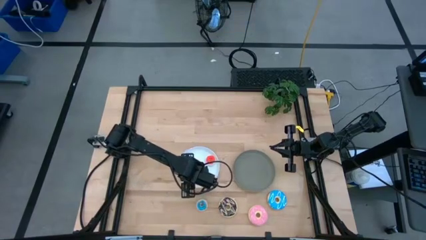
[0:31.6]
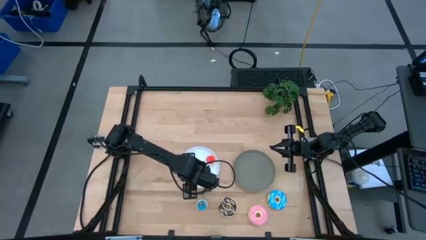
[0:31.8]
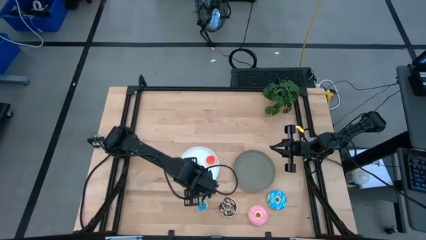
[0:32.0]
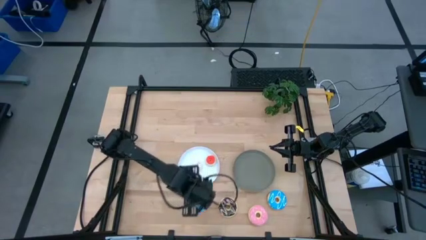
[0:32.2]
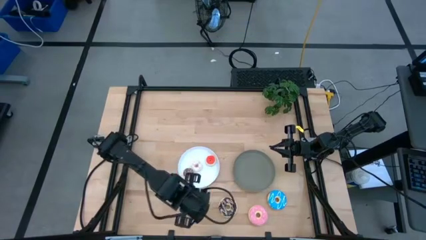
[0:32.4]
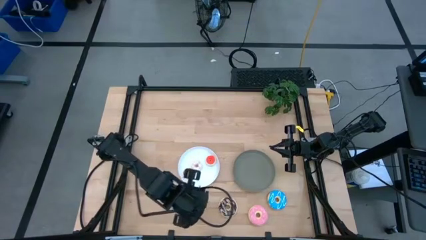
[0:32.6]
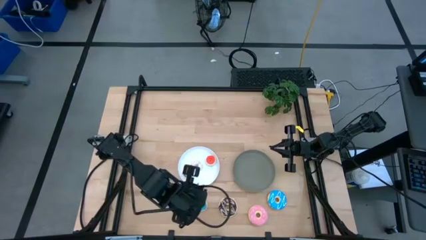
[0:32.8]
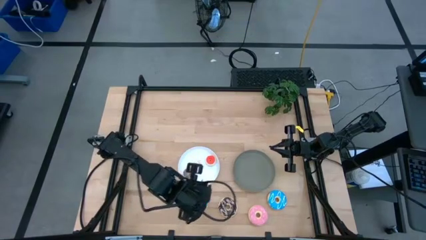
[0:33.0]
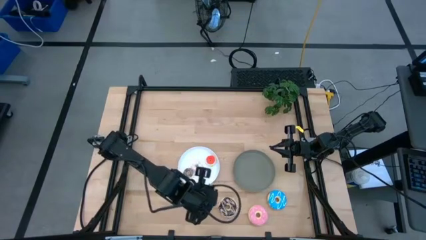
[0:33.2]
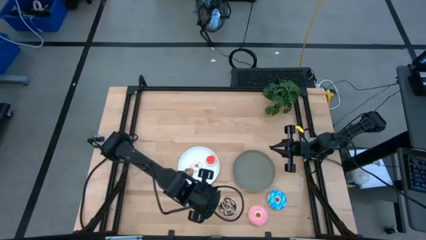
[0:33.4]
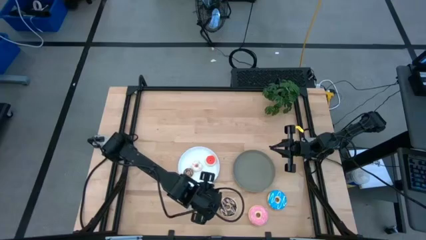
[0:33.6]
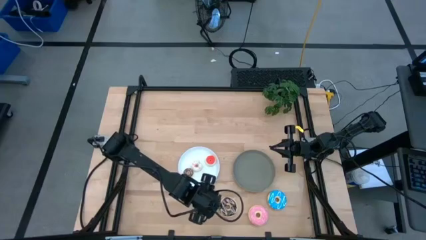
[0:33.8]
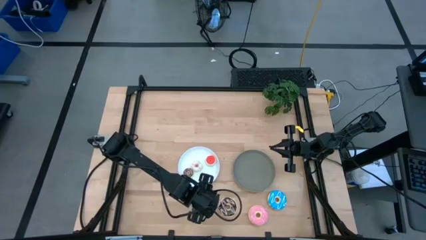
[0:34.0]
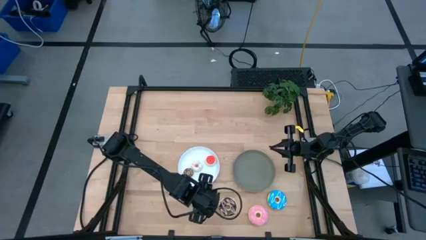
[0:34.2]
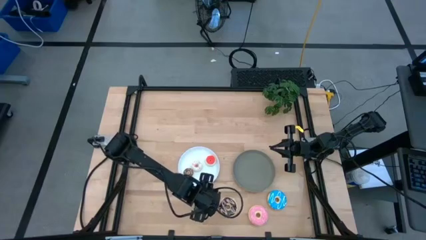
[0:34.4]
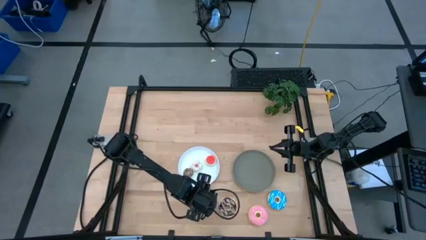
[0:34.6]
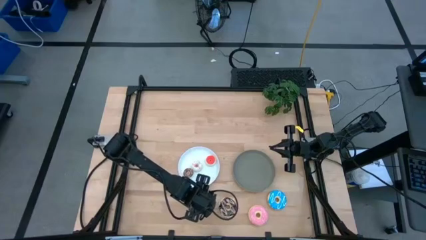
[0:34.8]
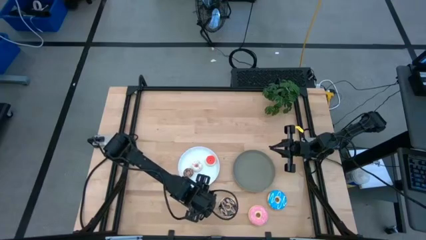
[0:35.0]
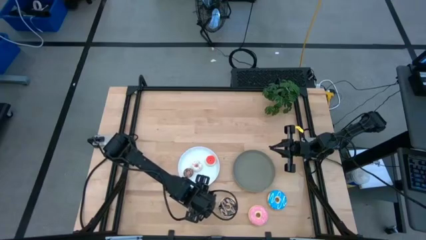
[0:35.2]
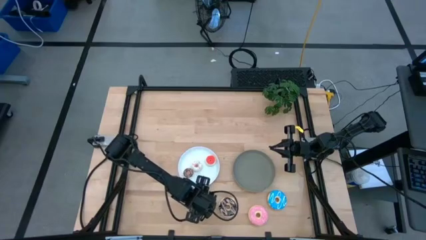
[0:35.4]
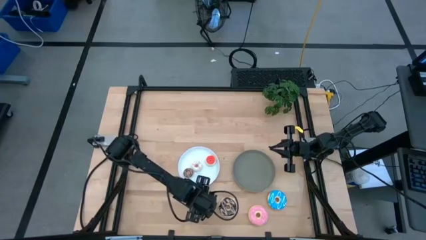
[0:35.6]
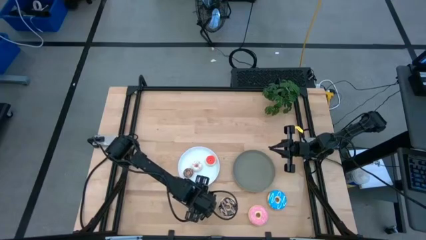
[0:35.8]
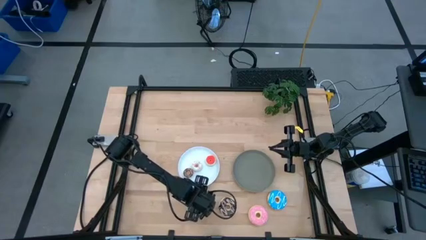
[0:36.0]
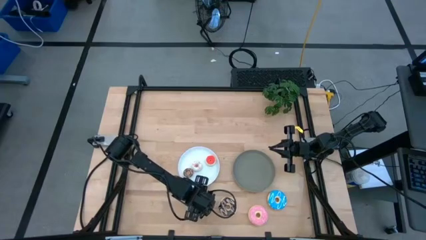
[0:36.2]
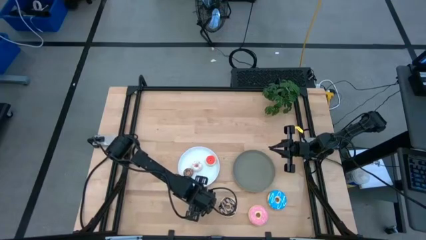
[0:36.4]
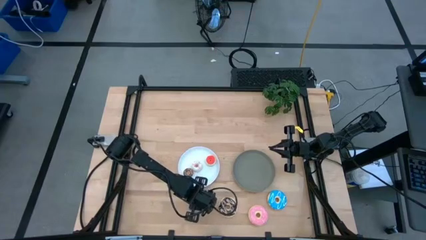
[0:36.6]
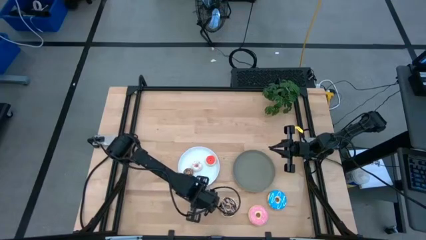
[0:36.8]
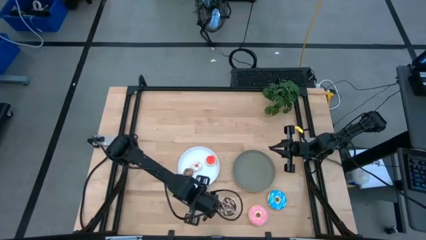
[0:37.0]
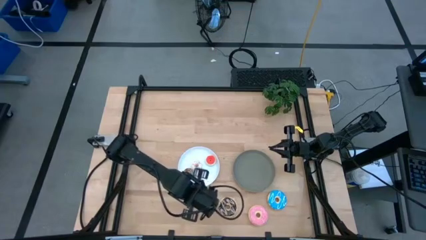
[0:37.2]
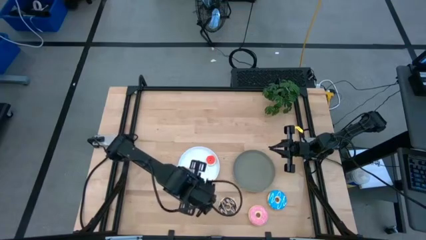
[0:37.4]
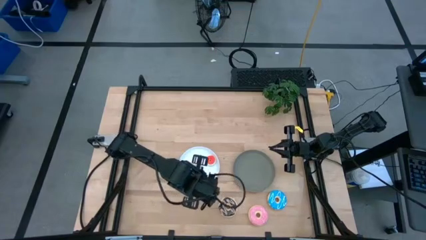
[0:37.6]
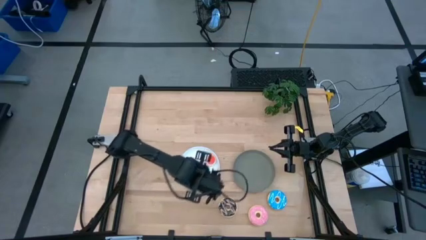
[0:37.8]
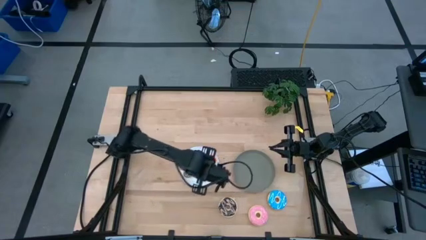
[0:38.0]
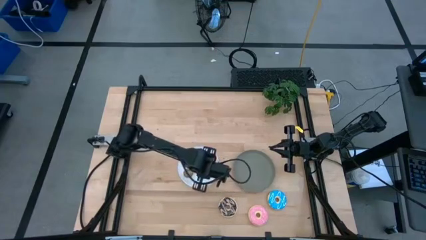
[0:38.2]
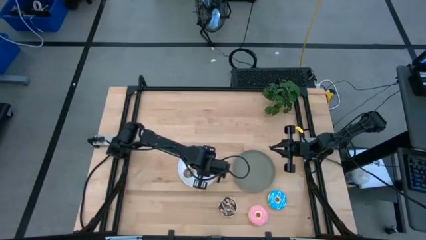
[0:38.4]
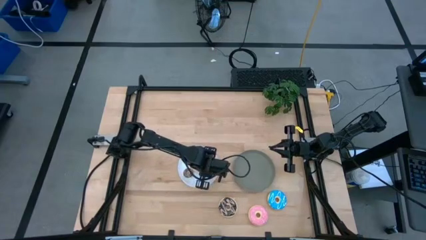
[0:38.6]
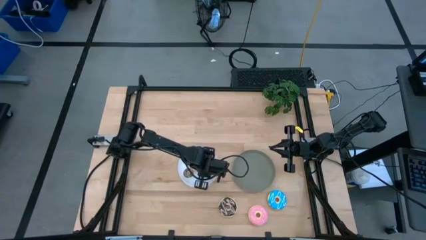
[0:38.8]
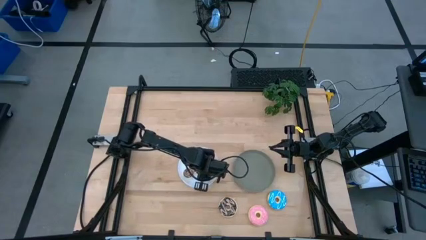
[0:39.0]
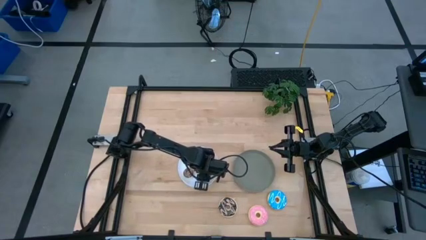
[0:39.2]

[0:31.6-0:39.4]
Task: Pick & Place donuts
Put the small blue donut on the white plate

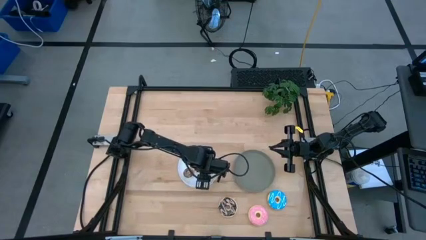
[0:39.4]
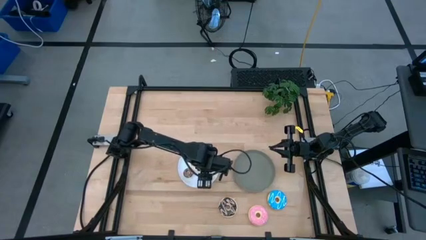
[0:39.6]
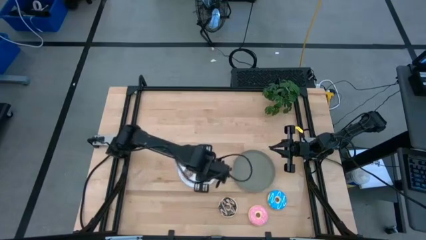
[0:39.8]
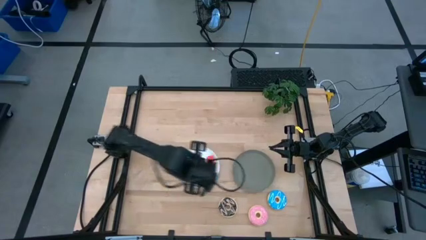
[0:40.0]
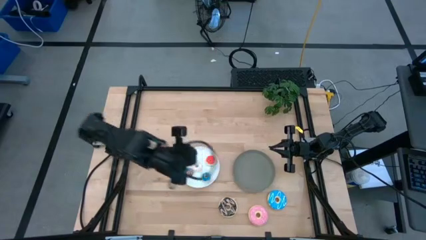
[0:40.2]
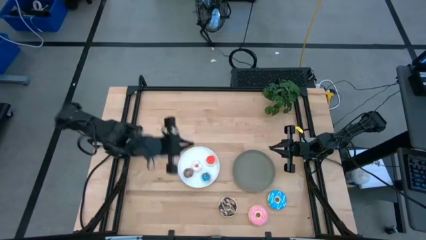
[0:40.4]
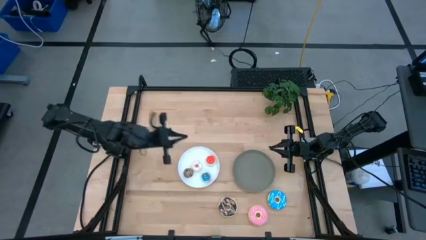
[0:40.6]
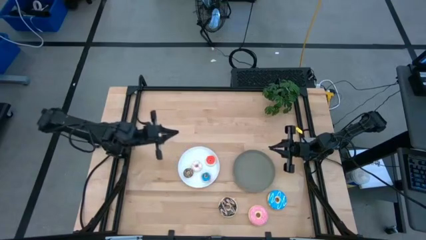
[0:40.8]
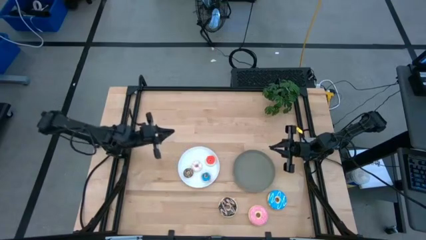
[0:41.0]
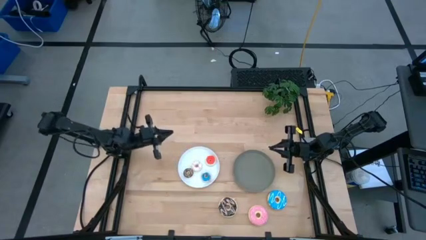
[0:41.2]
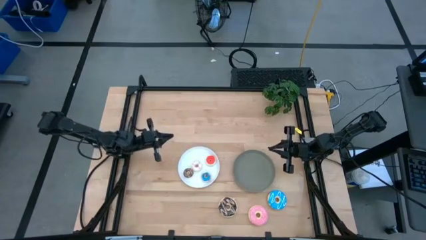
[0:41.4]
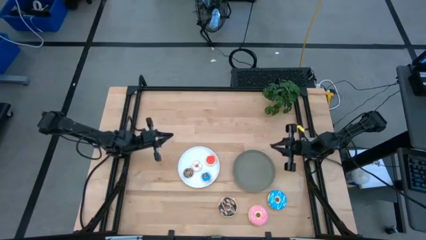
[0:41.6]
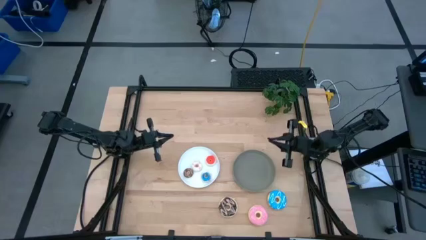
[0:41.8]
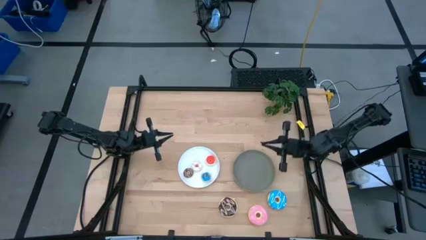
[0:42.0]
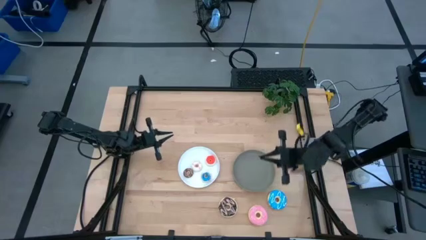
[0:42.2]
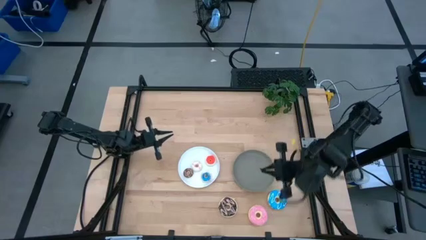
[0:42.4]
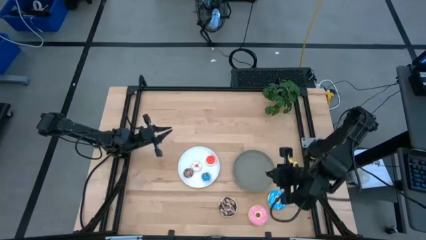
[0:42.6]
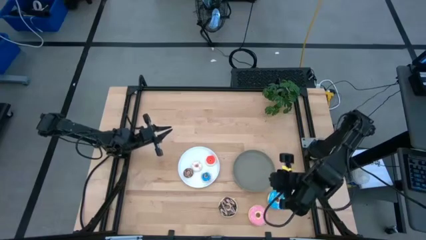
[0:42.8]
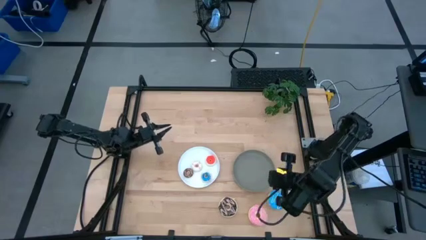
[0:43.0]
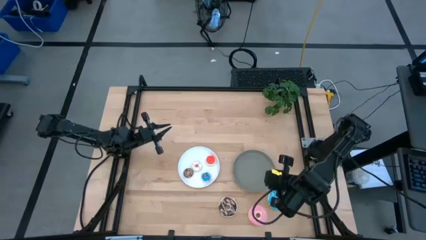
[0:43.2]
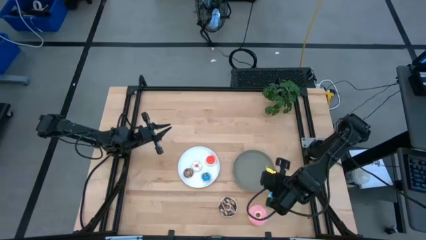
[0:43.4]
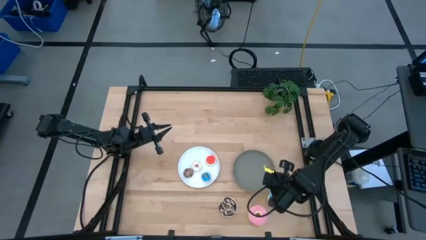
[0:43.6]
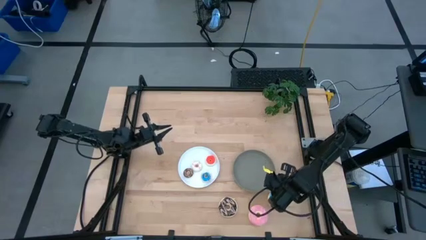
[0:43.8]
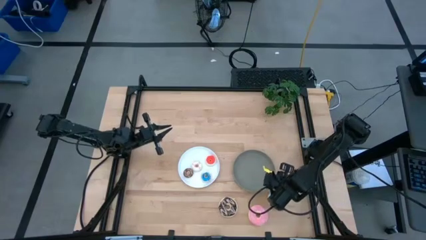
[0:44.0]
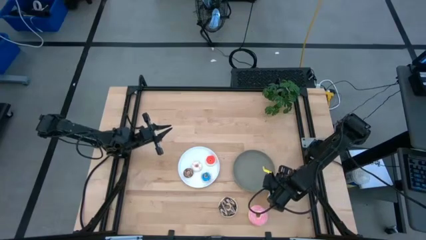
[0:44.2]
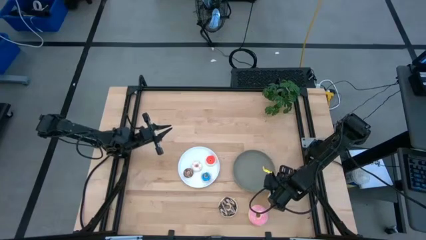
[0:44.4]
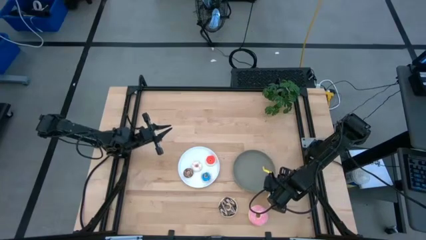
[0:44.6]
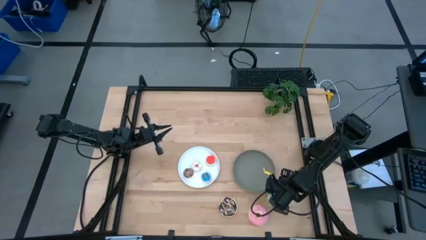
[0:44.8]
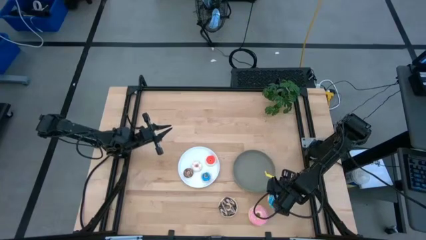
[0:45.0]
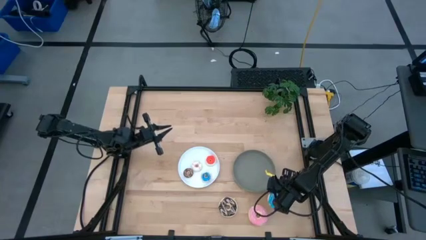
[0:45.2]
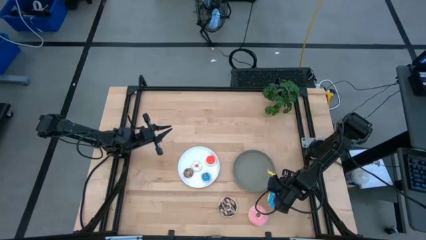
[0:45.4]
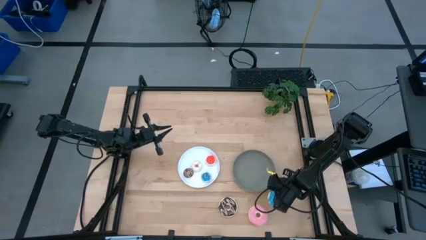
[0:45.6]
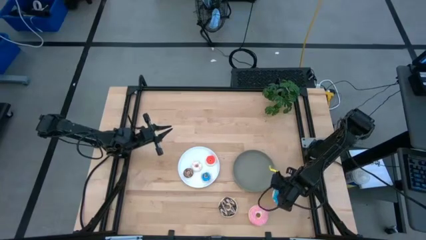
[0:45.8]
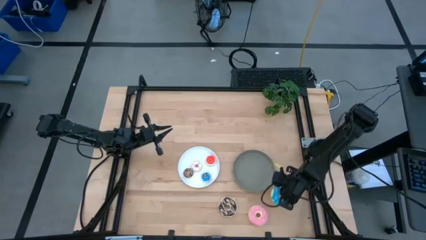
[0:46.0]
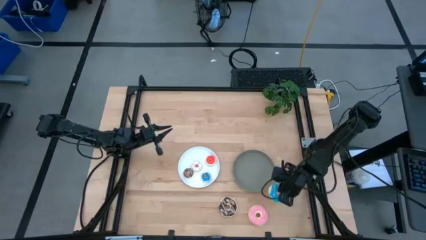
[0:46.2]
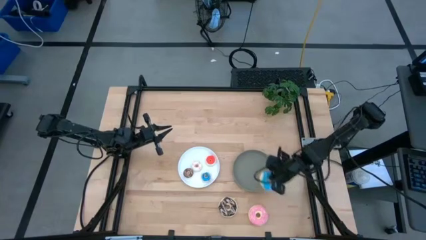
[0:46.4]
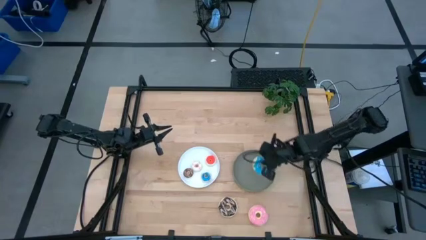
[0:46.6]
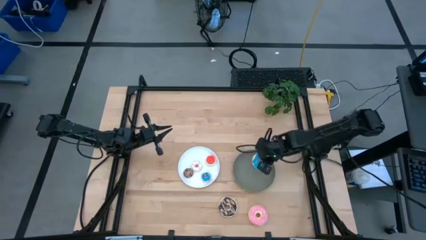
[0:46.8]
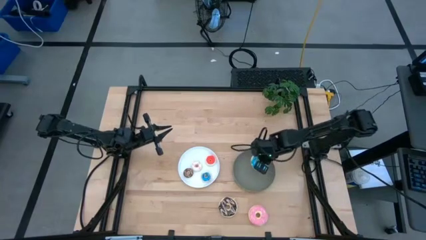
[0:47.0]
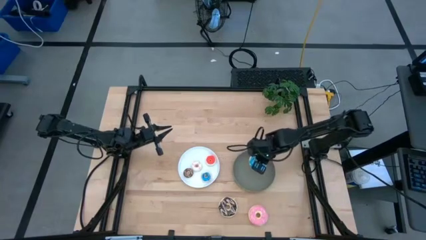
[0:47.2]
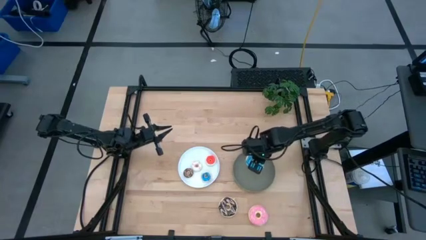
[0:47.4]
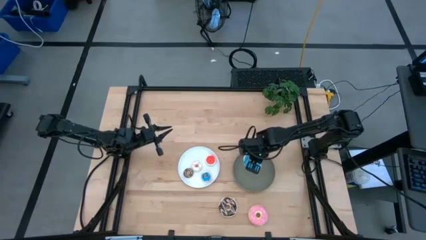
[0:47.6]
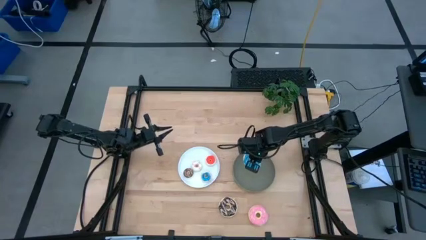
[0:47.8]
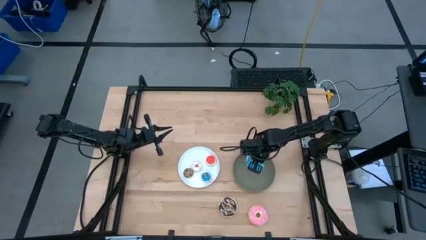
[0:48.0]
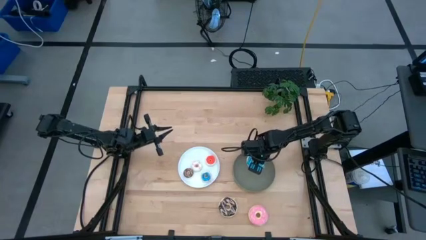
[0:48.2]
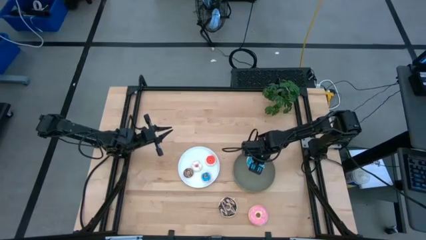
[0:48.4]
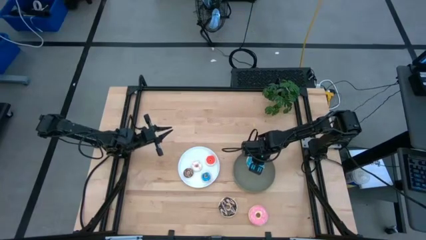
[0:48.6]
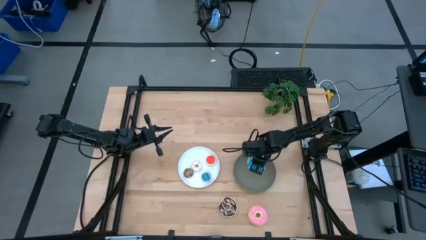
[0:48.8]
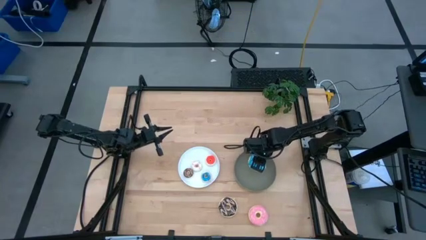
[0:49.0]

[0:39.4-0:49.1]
Put the large blue donut on the gray plate
